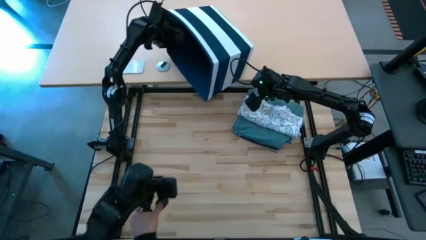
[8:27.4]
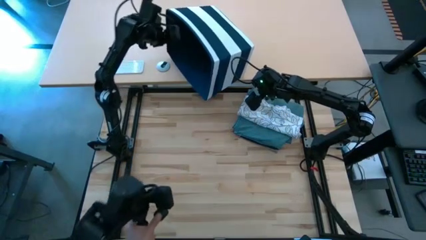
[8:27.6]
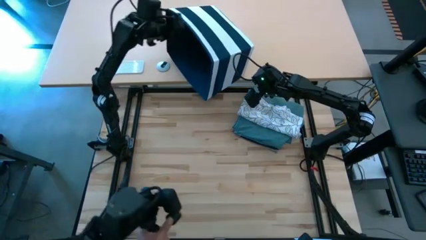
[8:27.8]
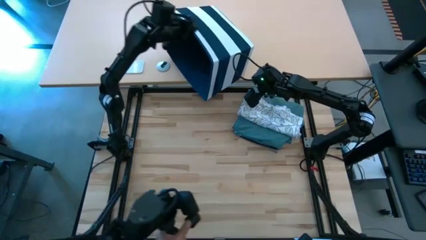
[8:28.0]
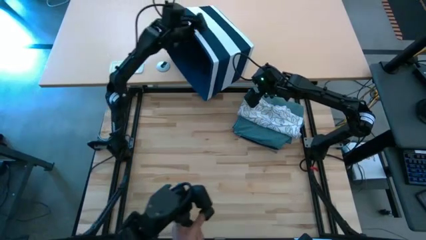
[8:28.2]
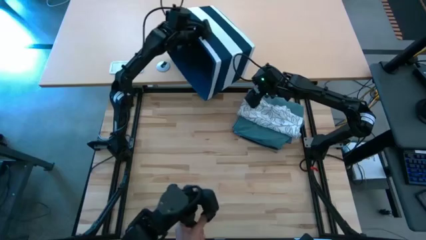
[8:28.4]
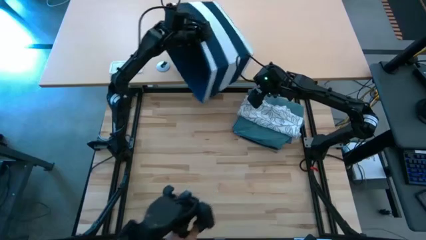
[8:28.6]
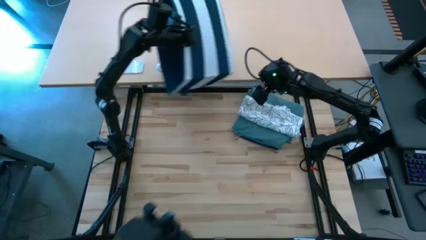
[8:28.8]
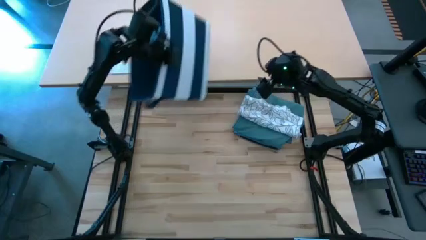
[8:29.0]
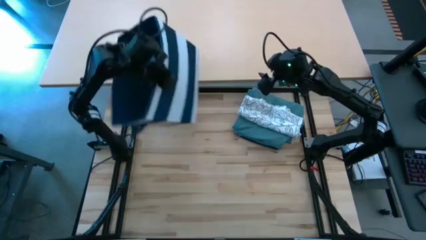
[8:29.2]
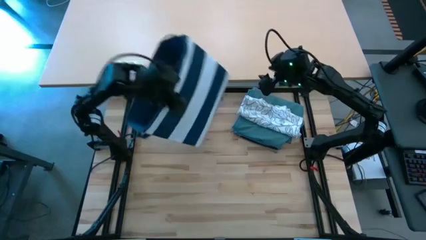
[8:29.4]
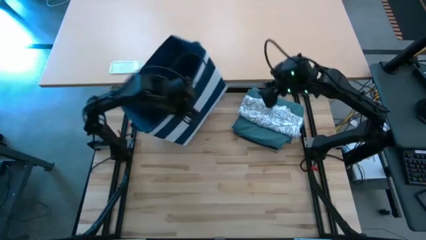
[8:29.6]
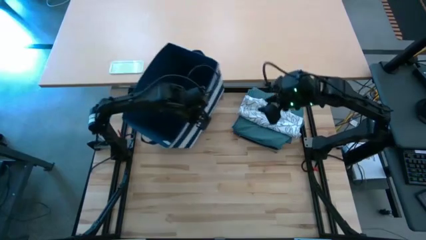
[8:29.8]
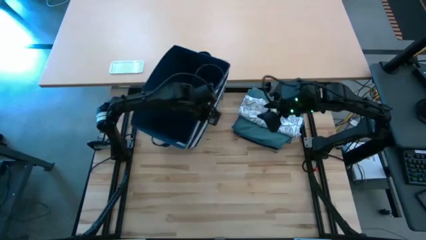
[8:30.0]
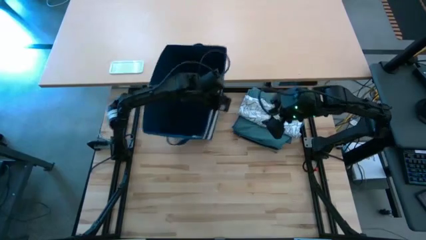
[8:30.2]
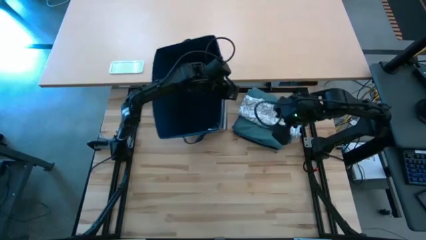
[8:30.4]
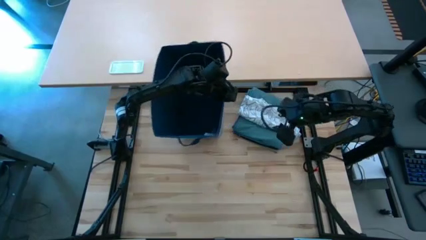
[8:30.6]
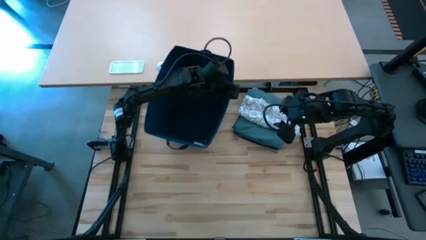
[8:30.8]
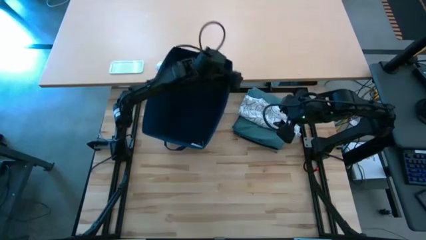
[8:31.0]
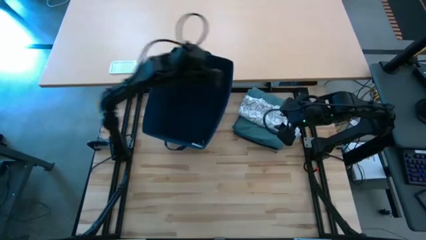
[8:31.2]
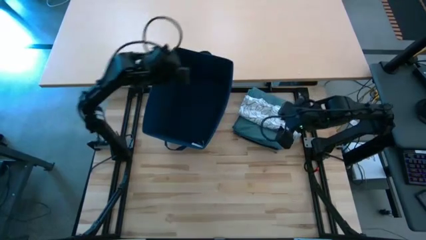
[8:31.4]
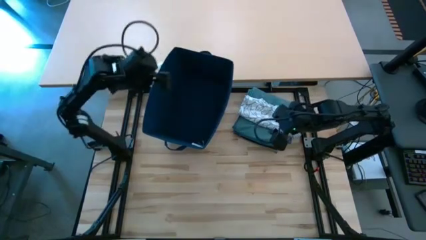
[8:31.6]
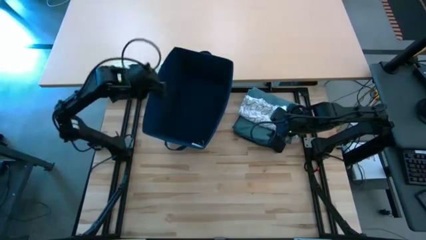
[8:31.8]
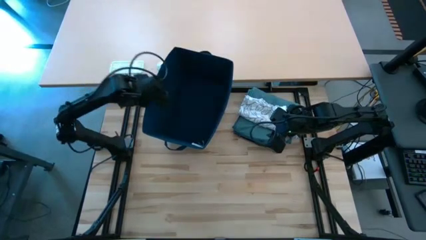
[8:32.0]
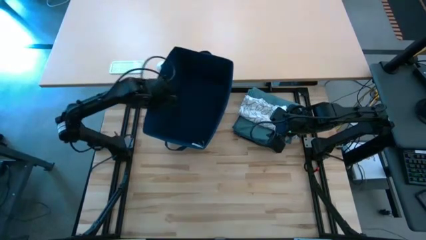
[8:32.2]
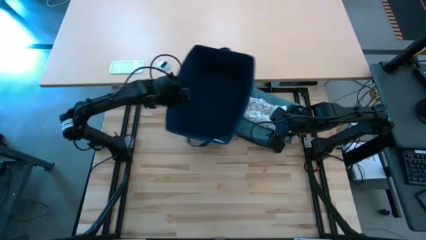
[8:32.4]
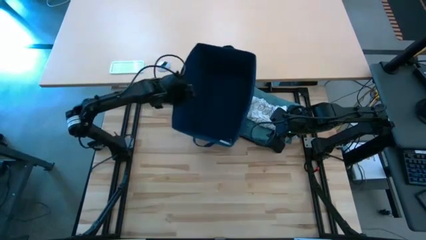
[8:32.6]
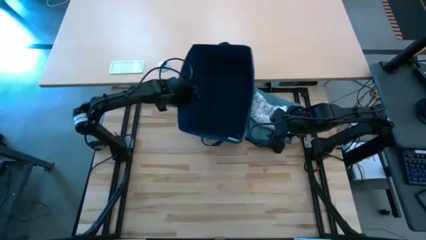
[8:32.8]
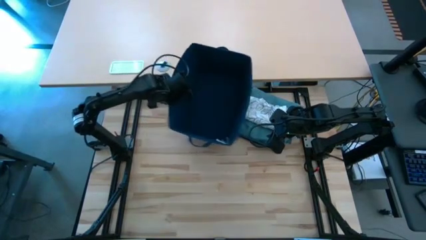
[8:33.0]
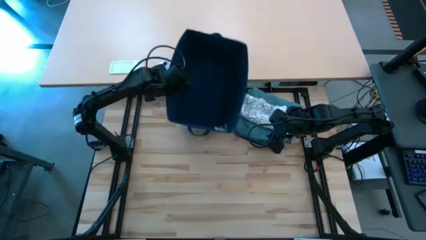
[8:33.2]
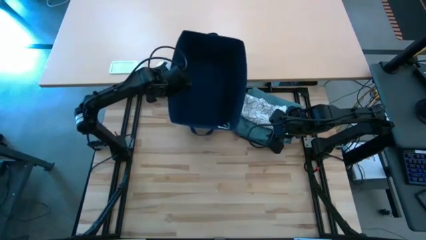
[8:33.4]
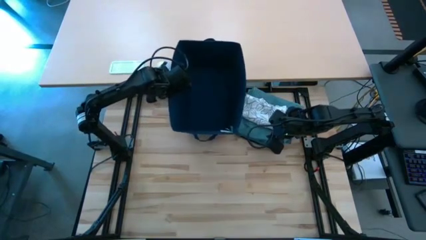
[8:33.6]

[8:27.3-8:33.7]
Task: Fold Laundry from Bin
Move the blue laundry basket to the top middle of the table

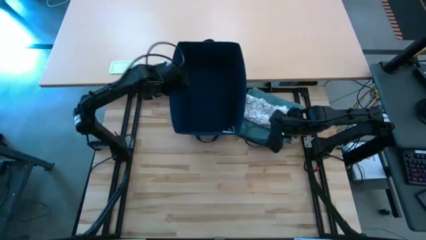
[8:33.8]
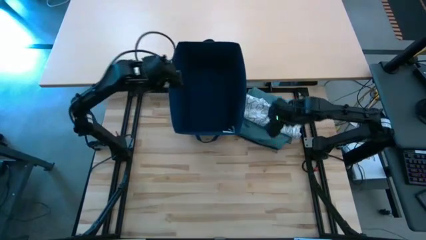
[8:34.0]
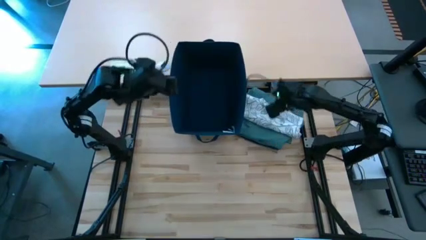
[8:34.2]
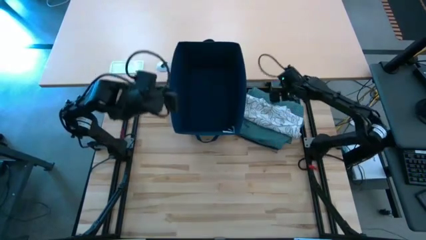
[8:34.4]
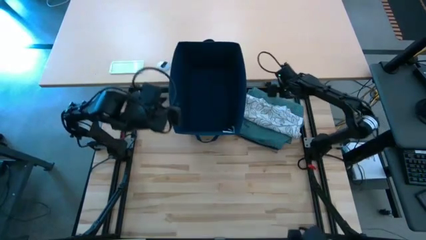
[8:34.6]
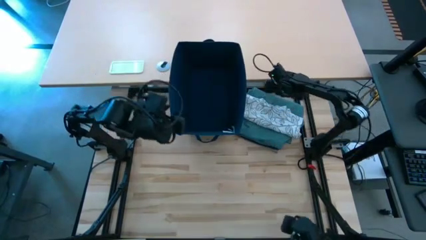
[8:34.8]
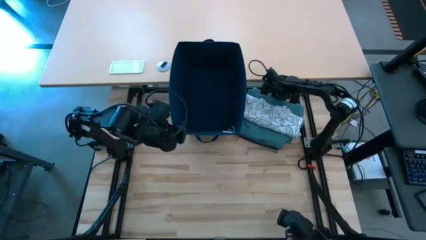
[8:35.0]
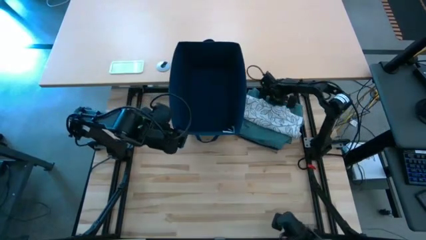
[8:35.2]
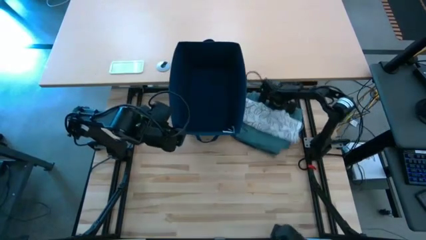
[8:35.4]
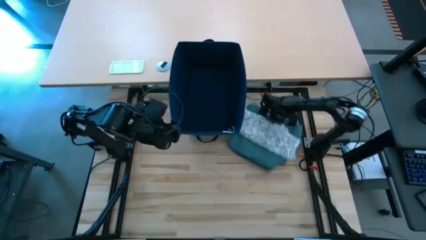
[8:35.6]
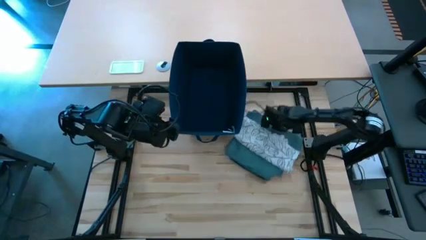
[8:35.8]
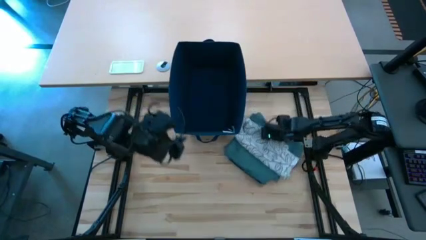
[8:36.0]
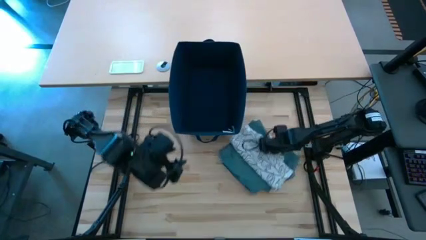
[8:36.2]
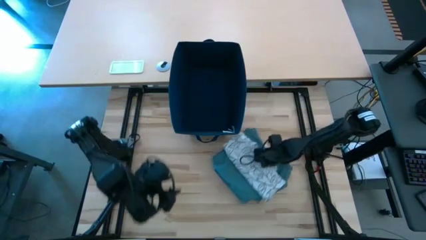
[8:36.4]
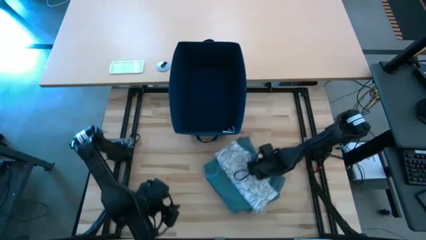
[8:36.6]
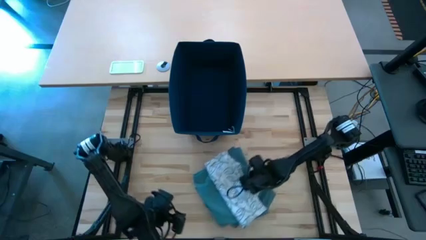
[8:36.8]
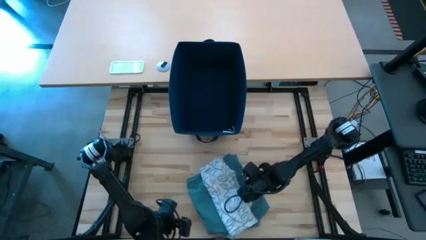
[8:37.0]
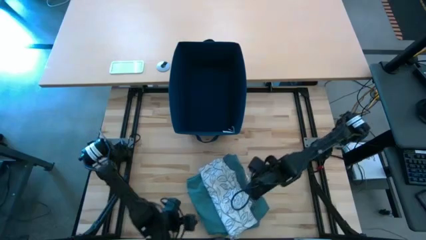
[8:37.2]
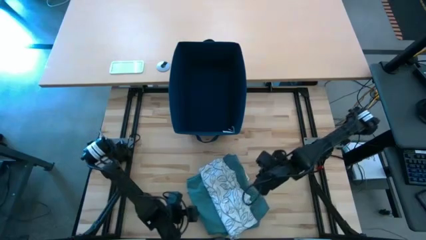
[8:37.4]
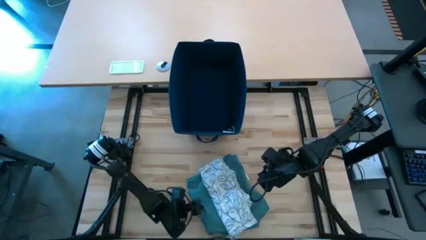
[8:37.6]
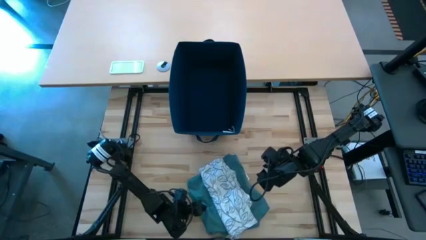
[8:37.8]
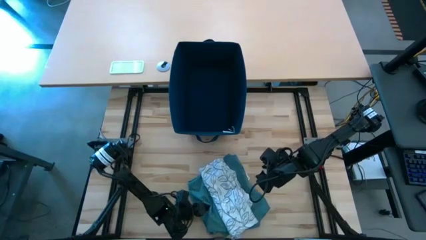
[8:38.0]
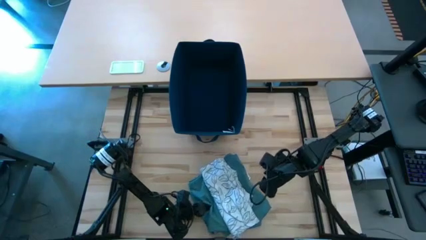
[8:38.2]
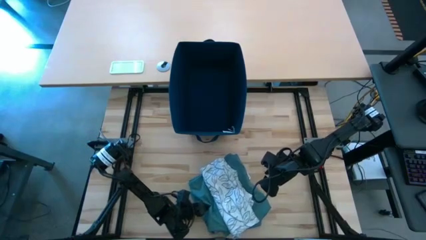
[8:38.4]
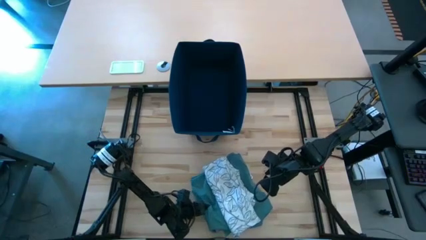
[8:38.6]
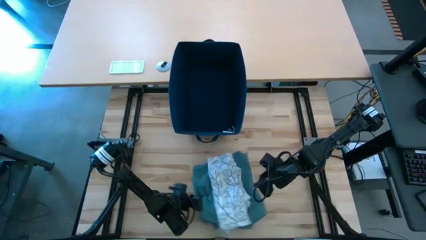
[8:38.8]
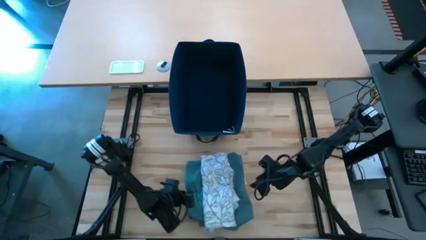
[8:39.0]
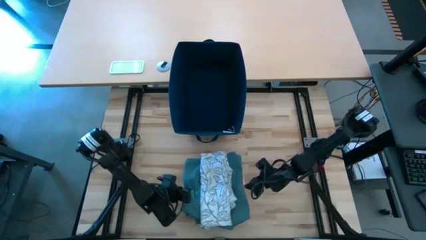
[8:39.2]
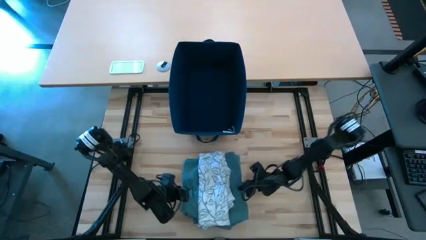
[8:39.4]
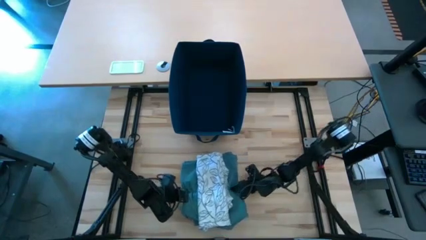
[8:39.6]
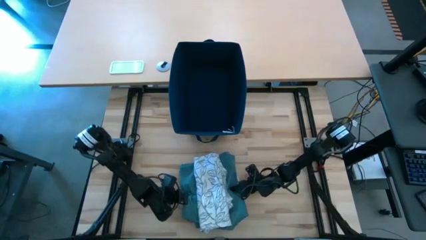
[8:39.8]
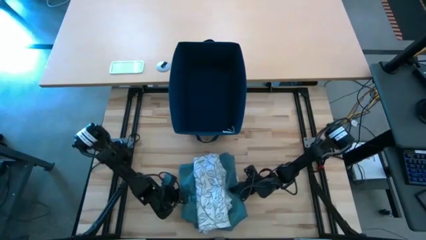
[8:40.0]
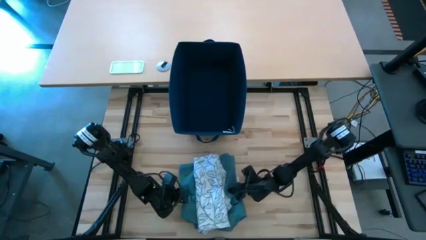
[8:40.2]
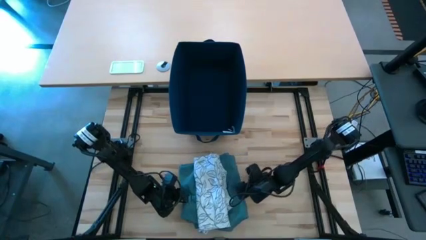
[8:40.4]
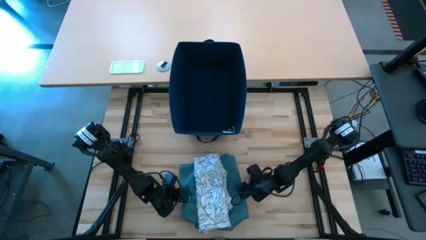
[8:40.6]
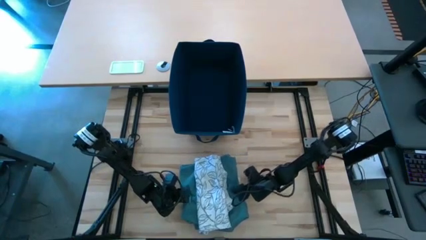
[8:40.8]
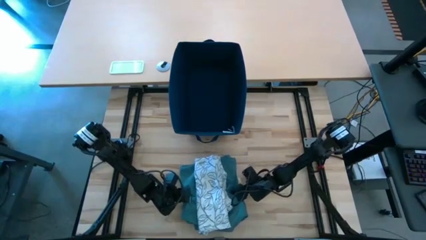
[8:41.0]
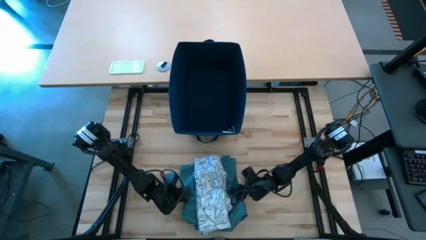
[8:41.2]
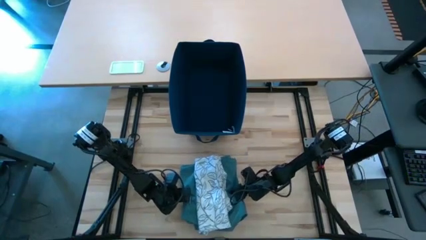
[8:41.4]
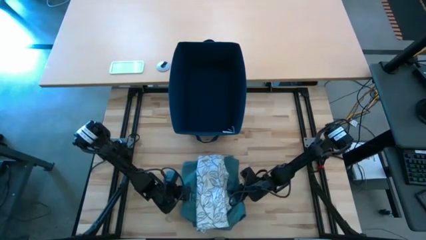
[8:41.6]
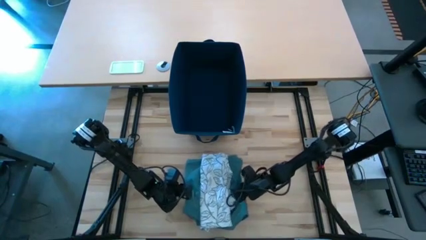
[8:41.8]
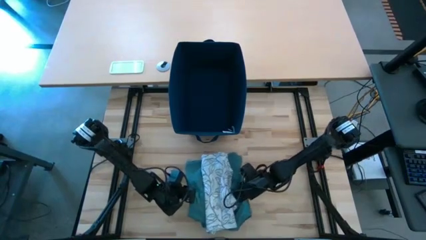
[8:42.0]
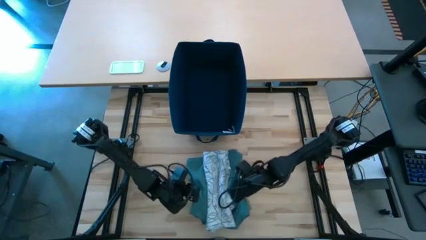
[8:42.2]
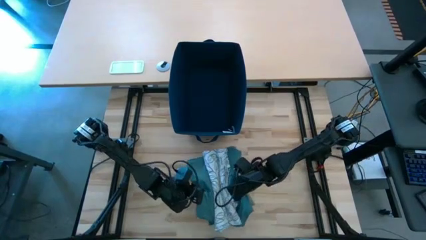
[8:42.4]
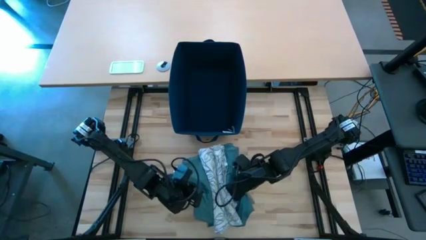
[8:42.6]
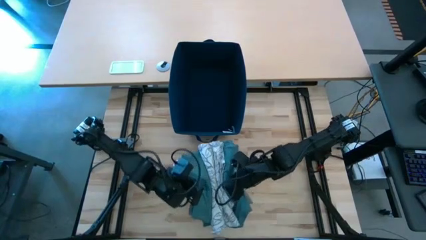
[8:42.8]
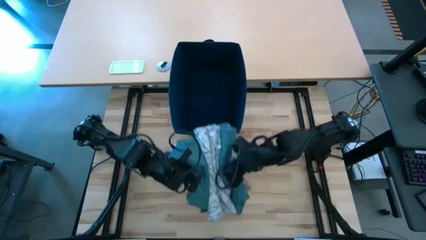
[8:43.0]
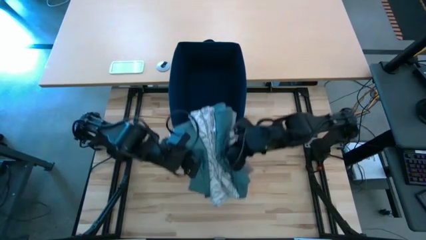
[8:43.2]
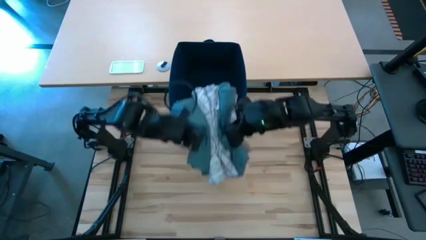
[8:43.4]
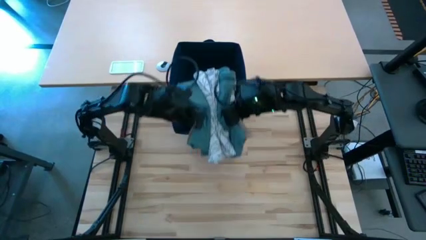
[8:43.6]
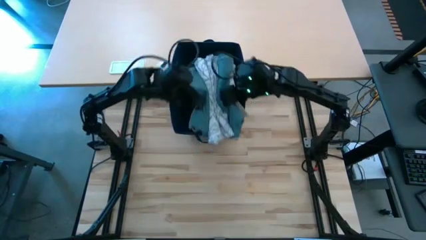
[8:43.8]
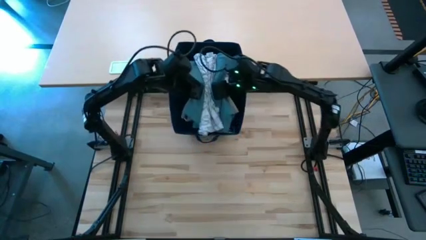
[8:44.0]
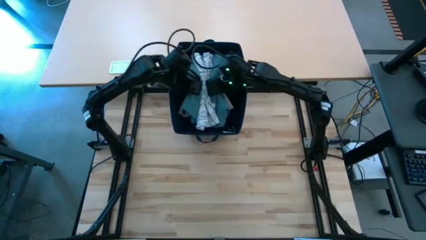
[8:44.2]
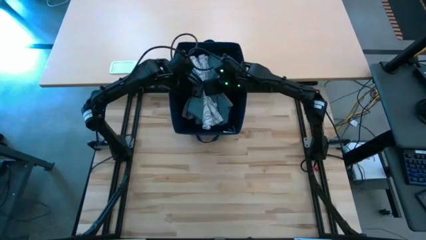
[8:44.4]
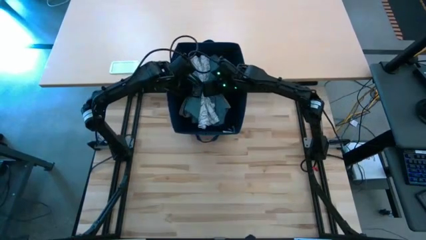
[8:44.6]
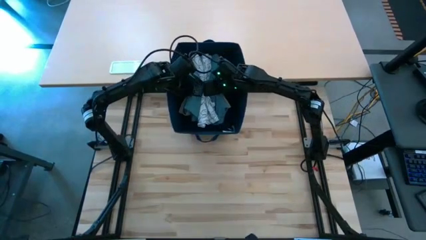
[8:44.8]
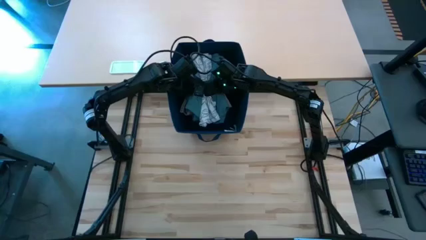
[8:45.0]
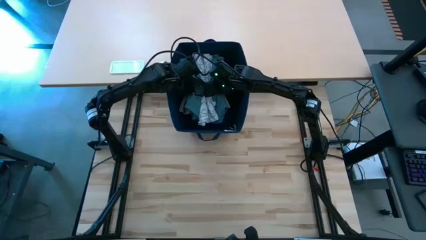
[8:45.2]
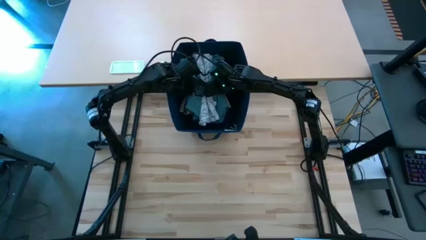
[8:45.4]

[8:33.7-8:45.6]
Put the folded clothes into the blue laundry basket
